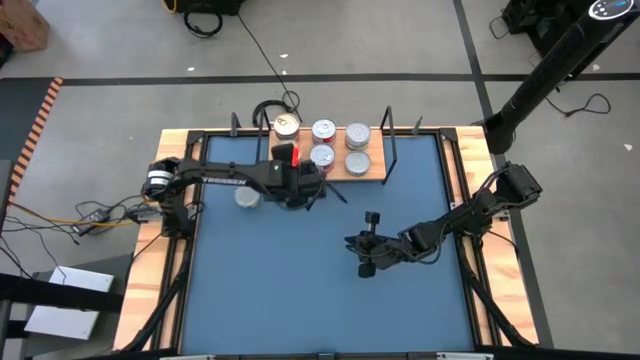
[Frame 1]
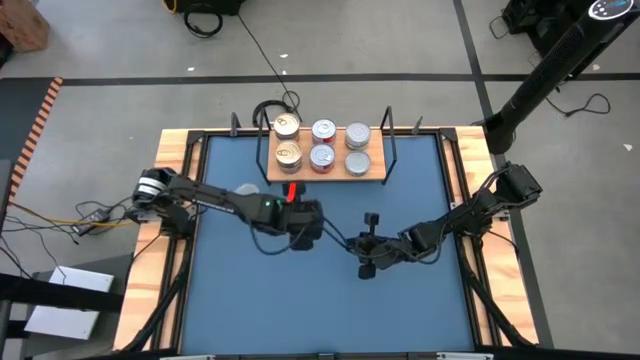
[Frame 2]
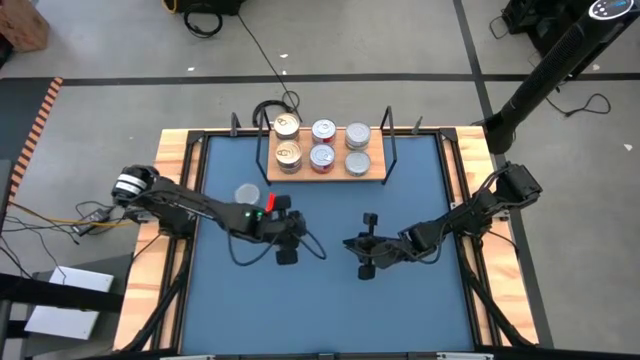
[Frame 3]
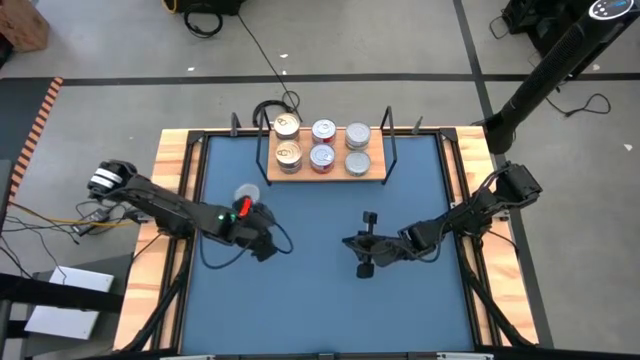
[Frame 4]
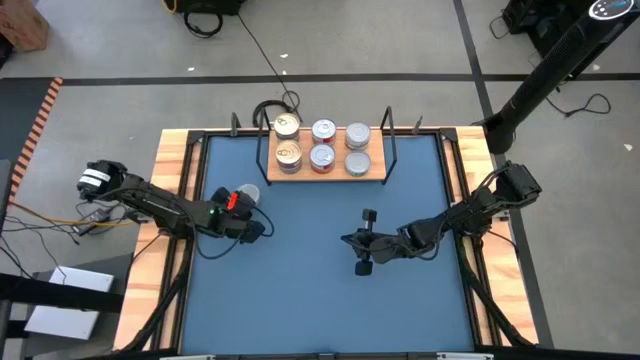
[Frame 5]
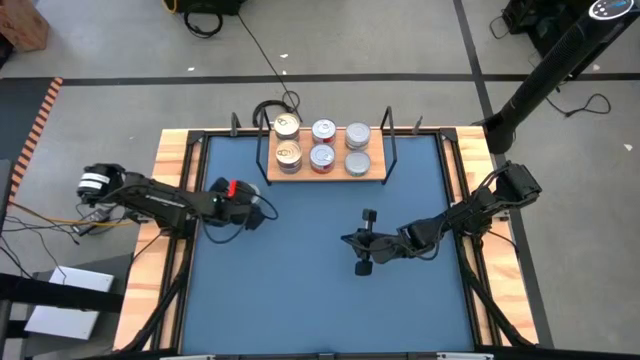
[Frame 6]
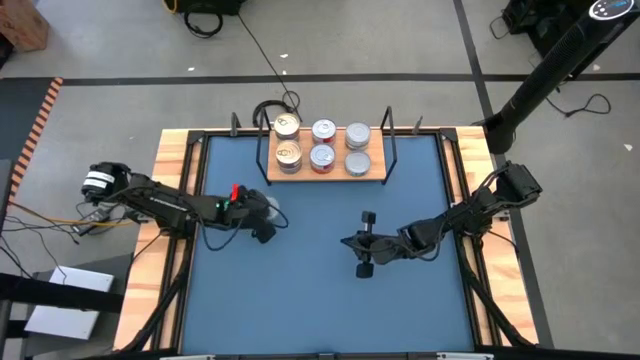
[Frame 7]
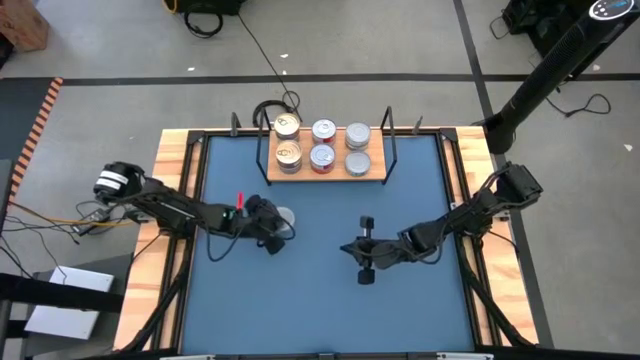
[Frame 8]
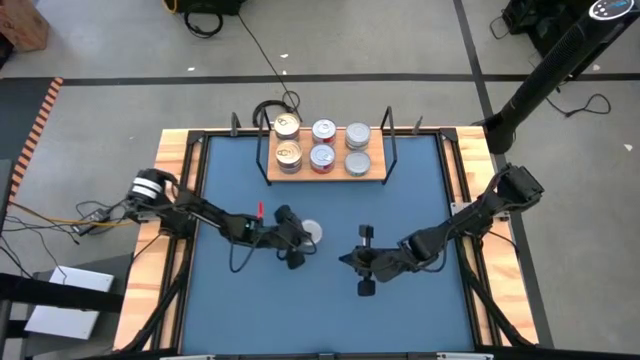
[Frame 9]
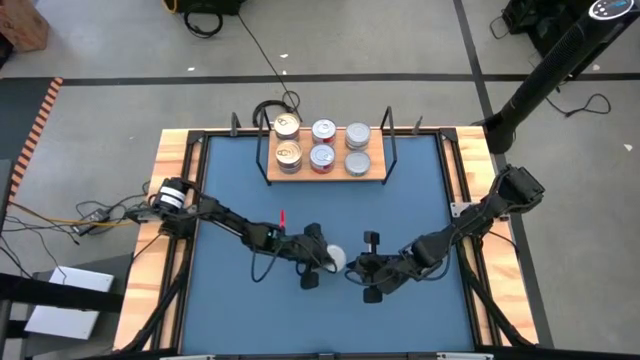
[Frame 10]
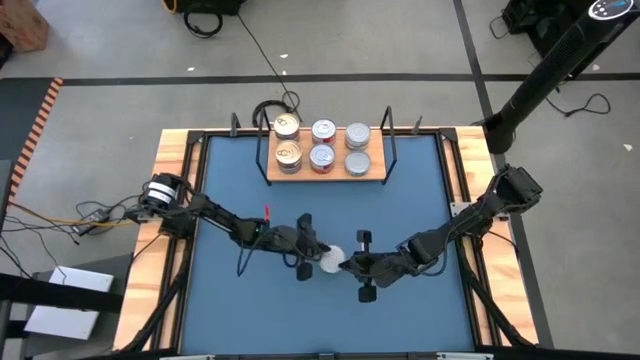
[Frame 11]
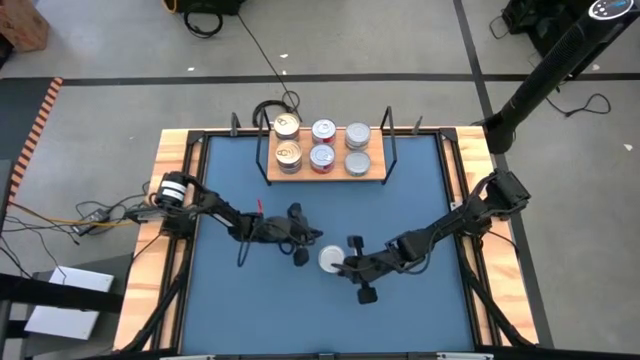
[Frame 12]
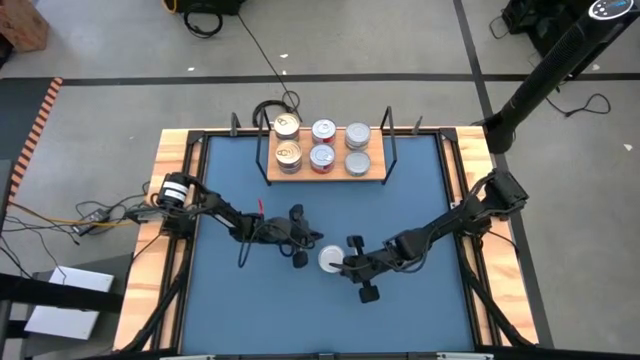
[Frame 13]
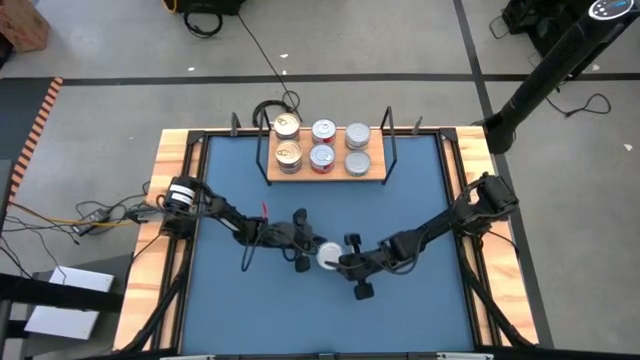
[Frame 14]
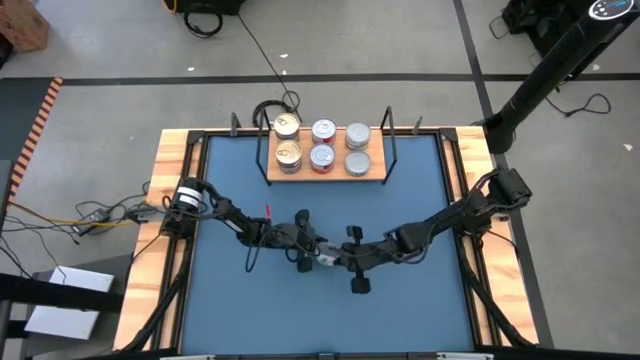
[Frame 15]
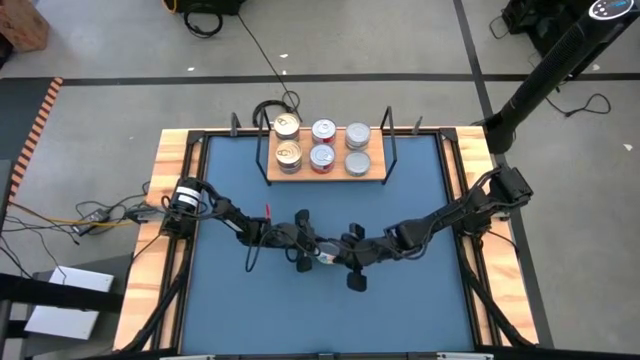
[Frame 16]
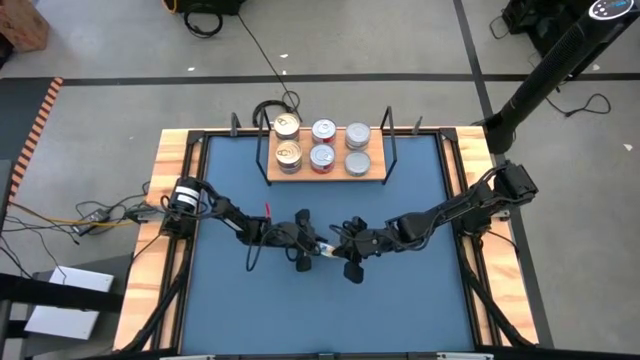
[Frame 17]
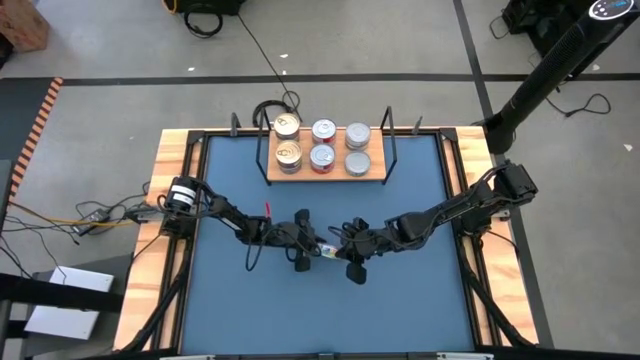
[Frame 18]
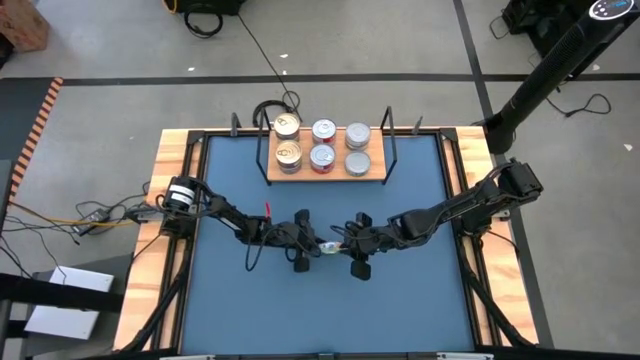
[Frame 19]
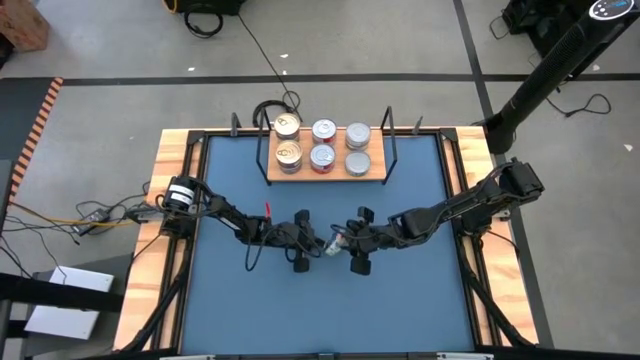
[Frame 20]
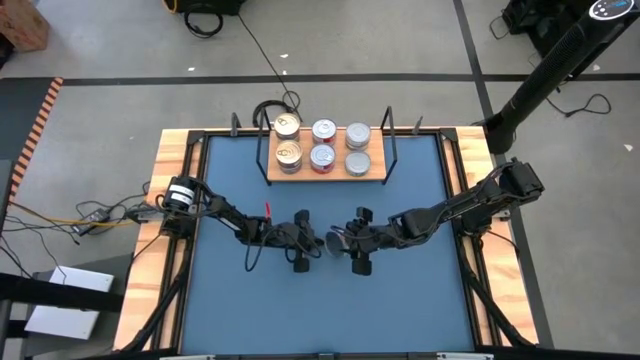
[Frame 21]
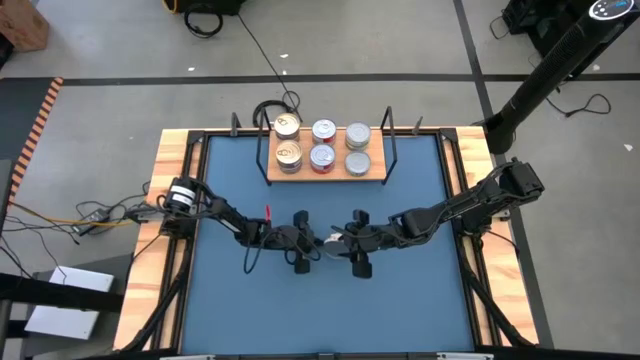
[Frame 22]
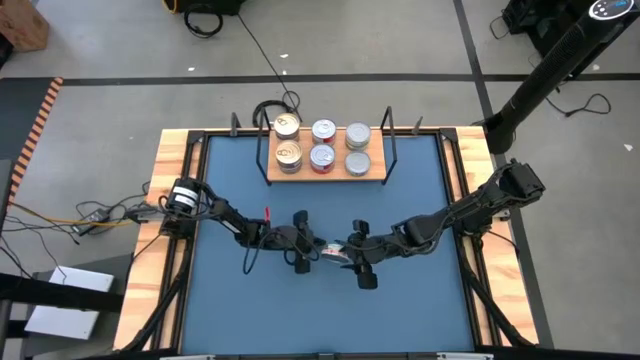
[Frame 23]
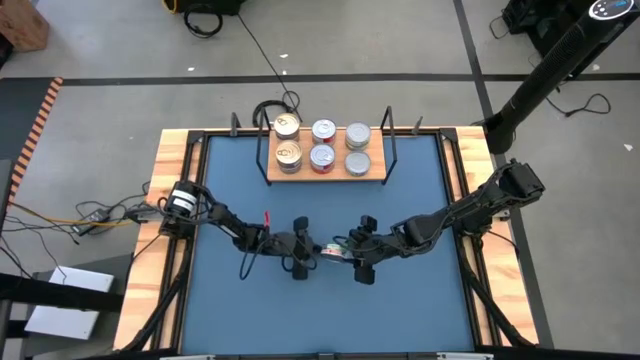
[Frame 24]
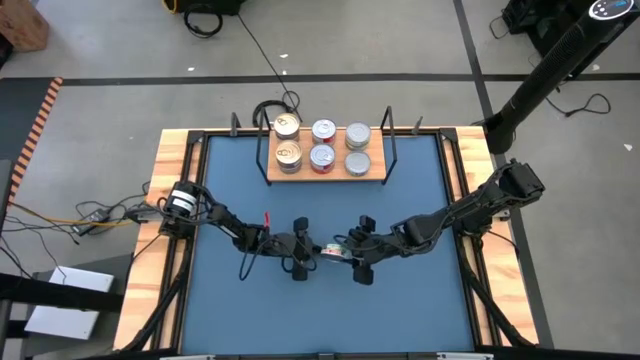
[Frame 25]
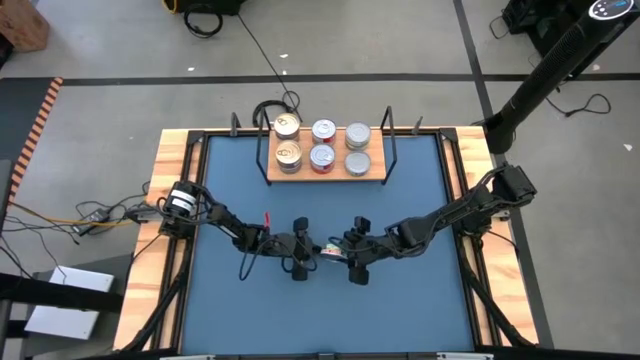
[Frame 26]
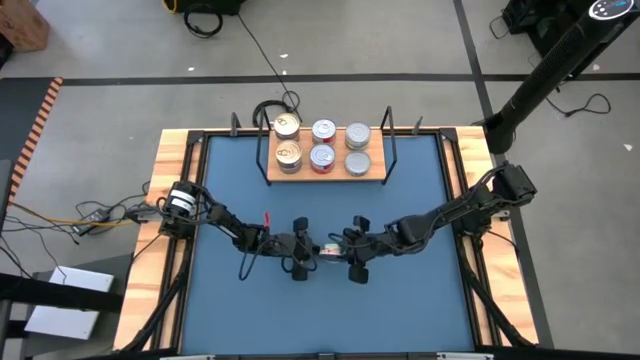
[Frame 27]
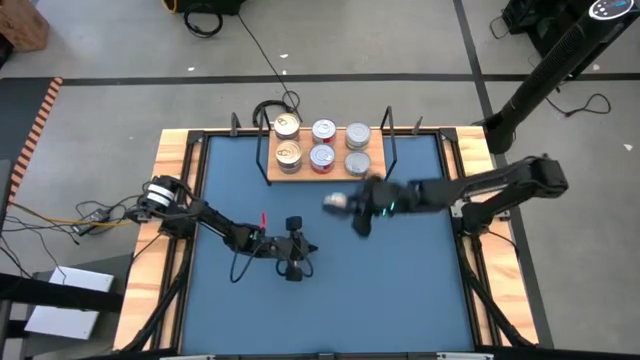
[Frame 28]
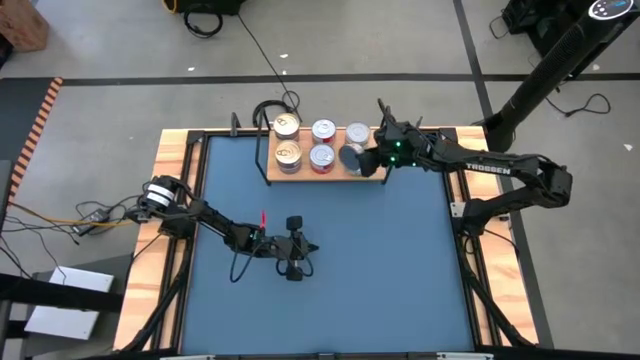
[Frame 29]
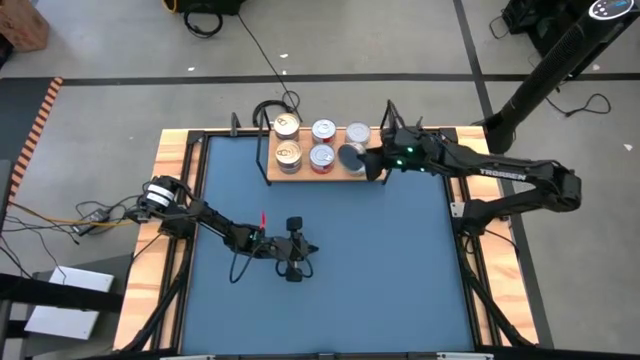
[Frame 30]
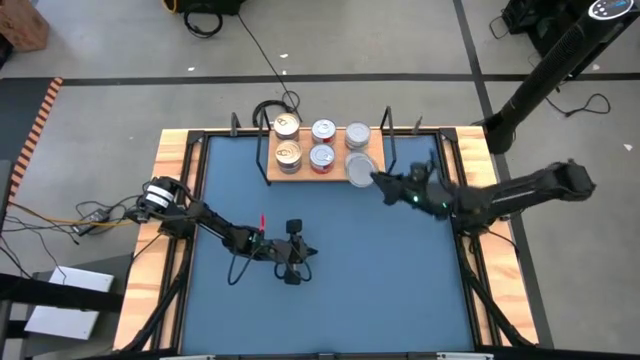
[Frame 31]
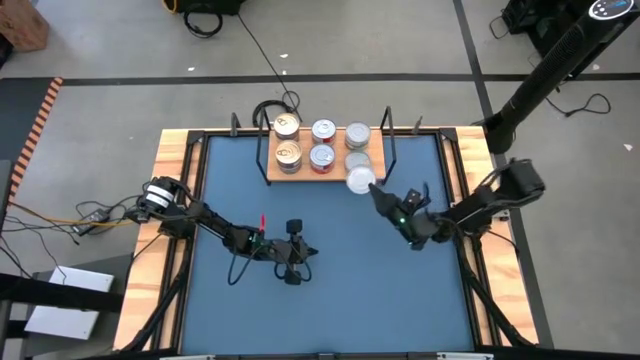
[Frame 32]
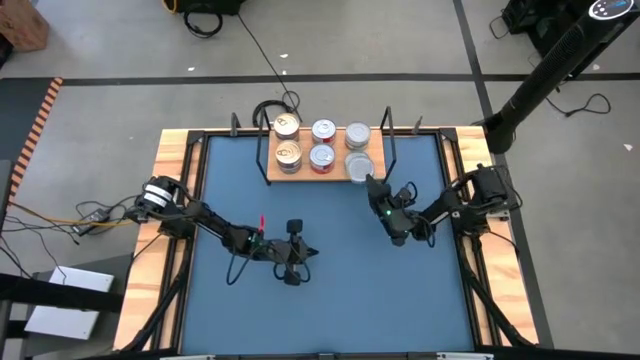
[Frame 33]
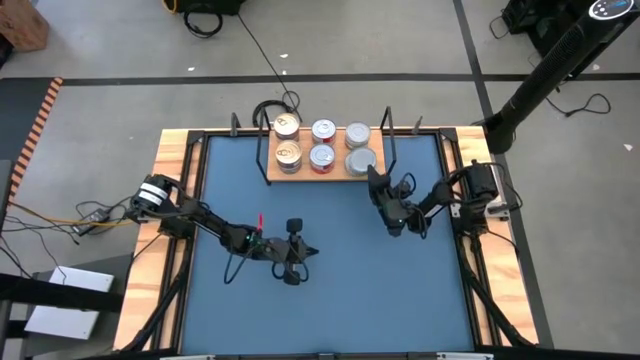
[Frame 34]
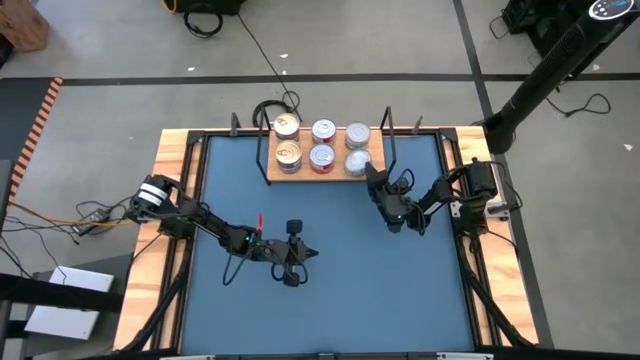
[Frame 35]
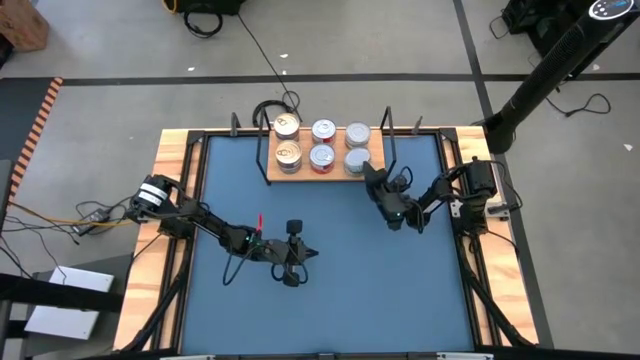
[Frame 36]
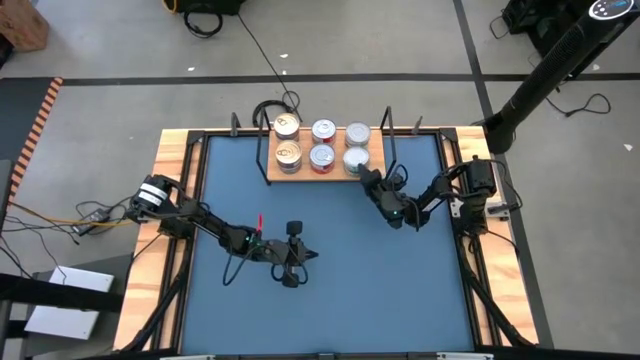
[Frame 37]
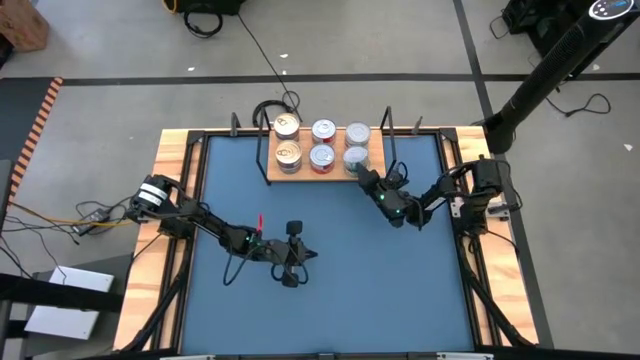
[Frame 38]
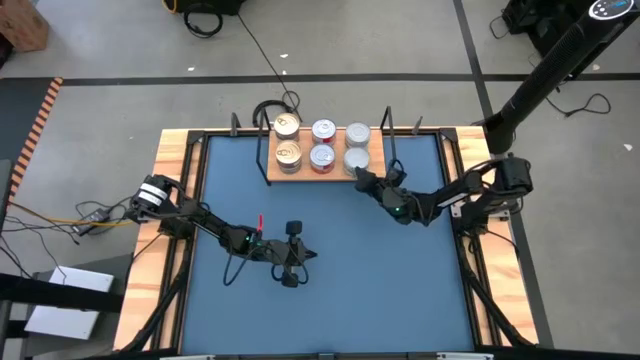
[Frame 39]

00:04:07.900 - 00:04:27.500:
Task: Stack canned seafood by type on shelf
Stack the white tuna can on the bottom white tuna can on the shelf
